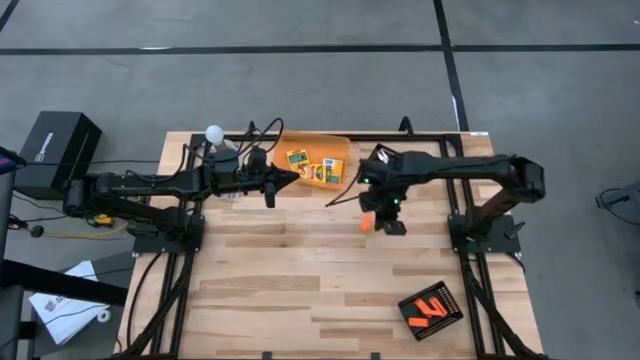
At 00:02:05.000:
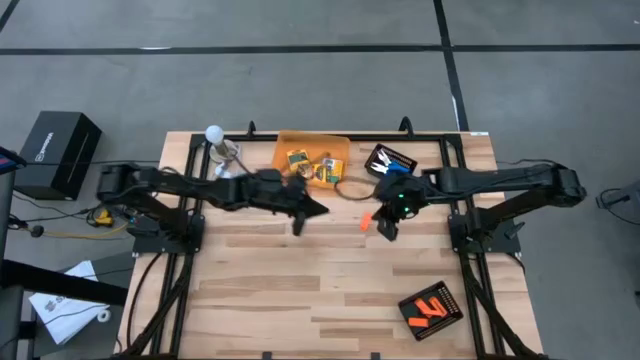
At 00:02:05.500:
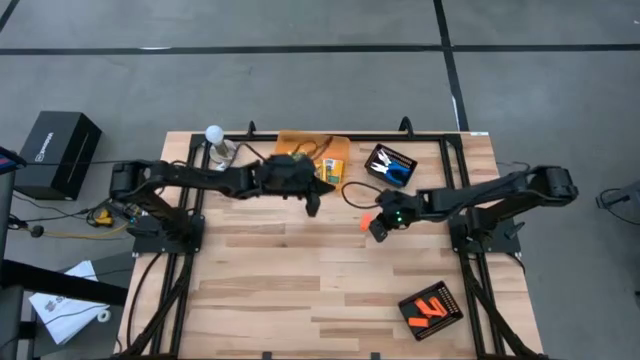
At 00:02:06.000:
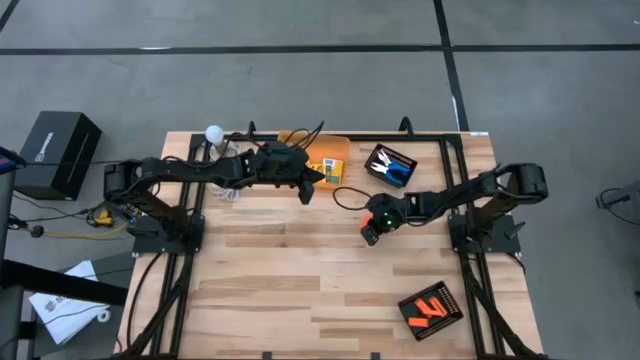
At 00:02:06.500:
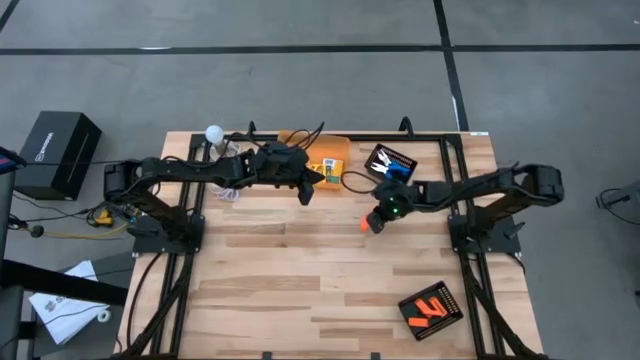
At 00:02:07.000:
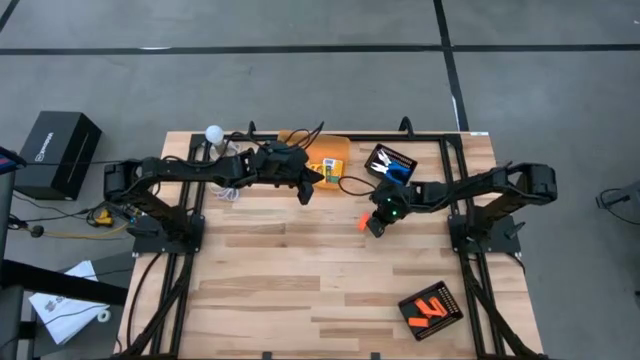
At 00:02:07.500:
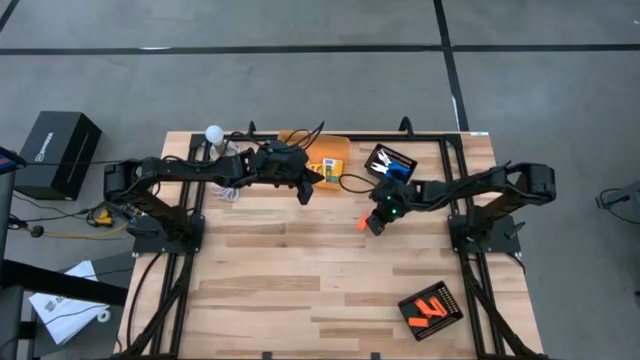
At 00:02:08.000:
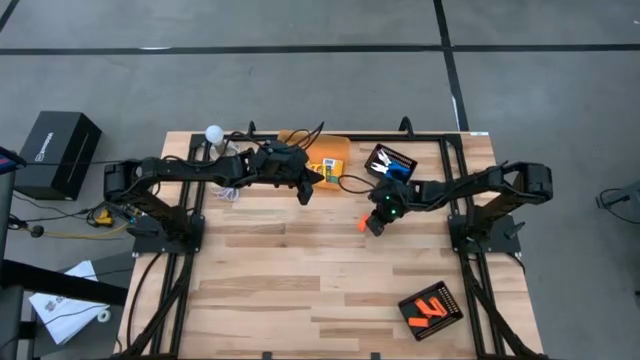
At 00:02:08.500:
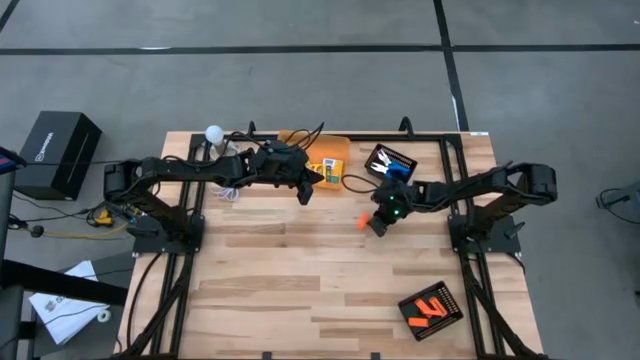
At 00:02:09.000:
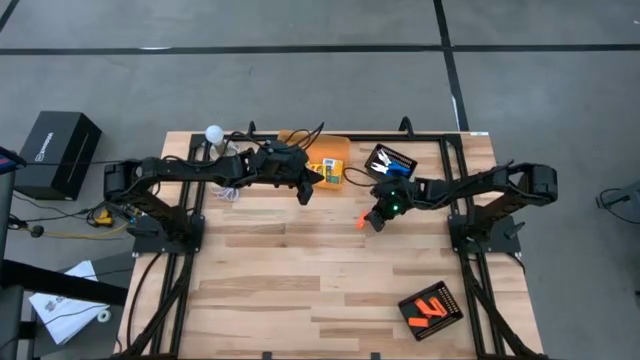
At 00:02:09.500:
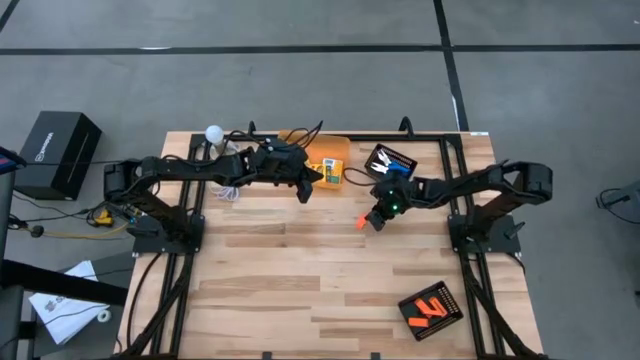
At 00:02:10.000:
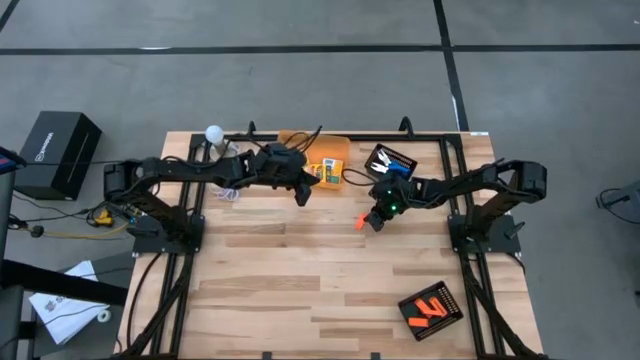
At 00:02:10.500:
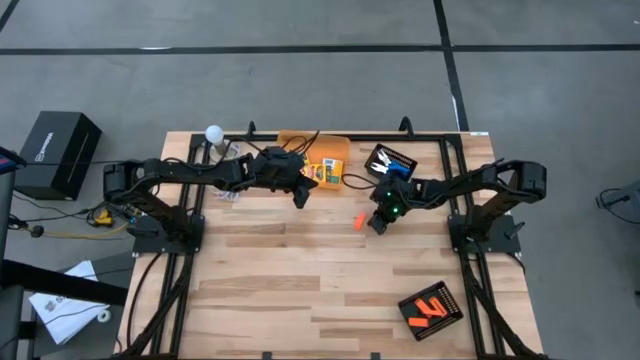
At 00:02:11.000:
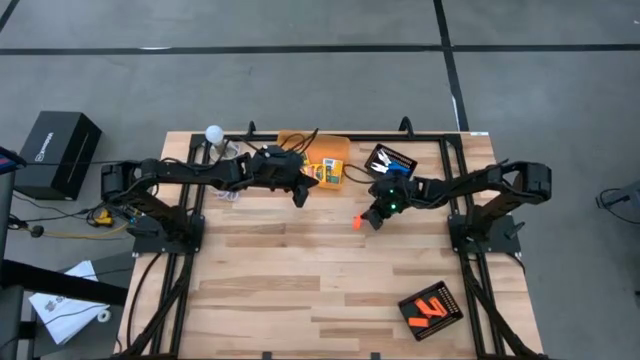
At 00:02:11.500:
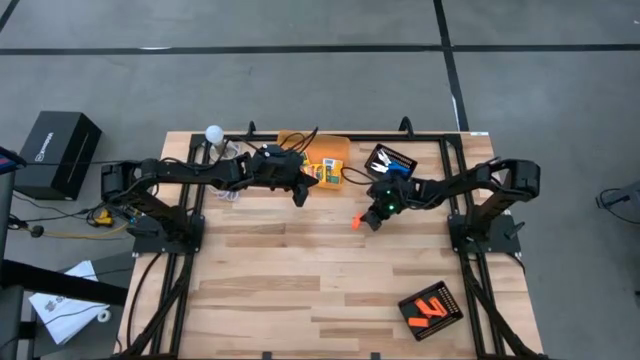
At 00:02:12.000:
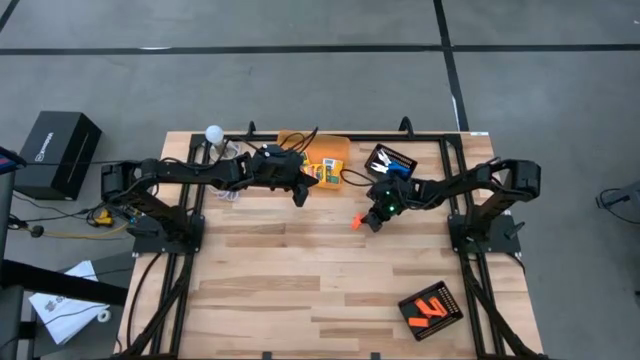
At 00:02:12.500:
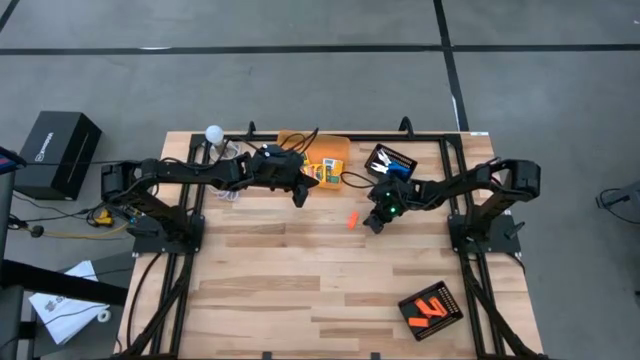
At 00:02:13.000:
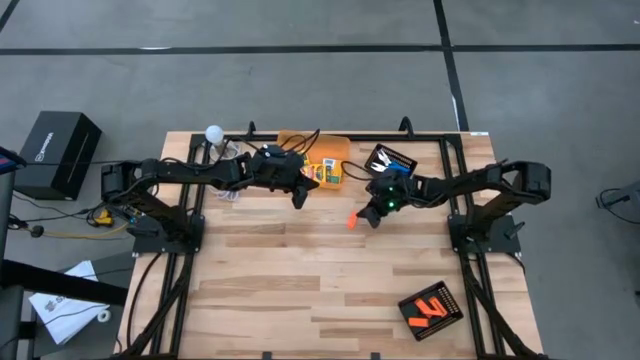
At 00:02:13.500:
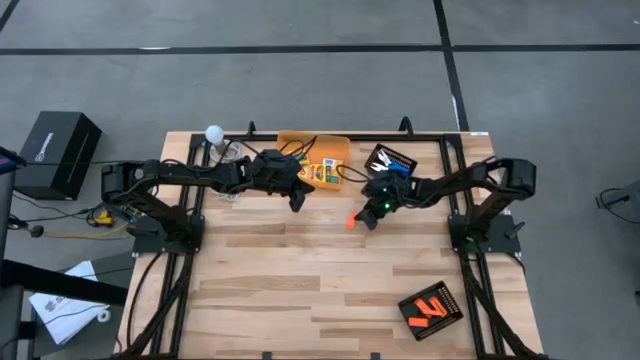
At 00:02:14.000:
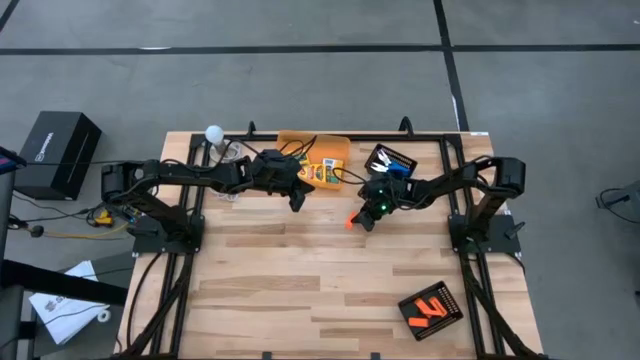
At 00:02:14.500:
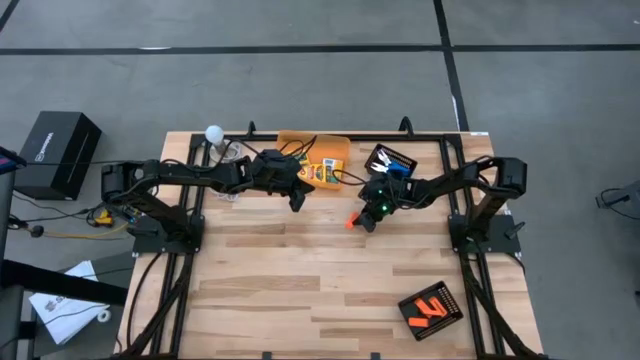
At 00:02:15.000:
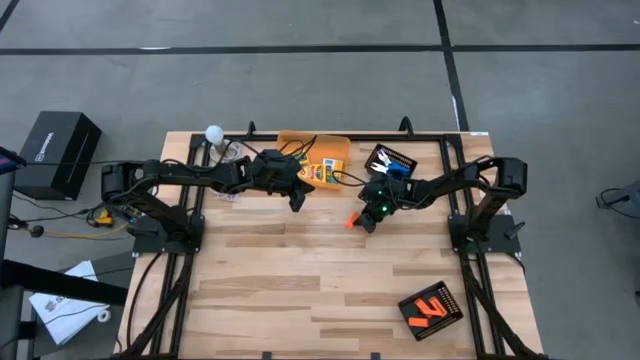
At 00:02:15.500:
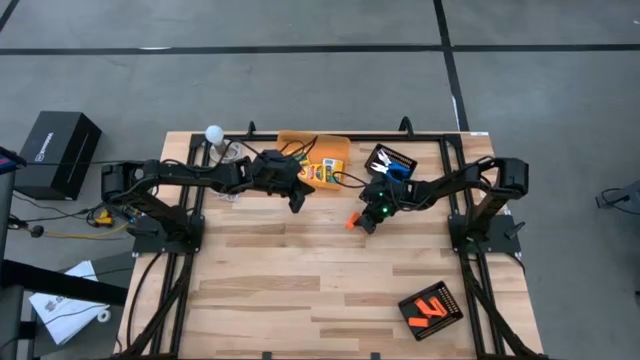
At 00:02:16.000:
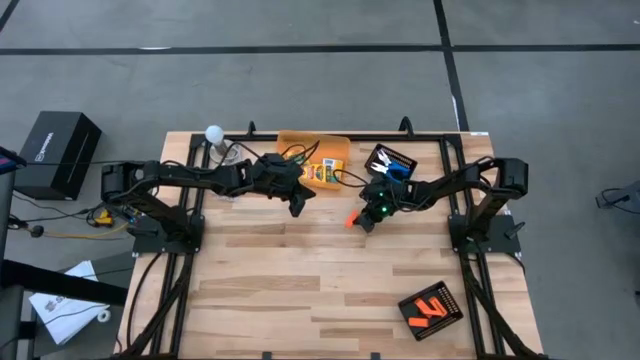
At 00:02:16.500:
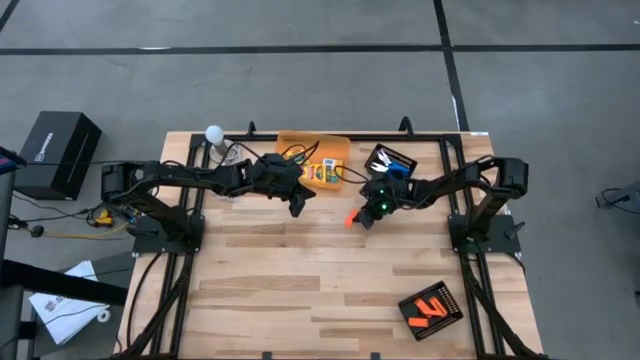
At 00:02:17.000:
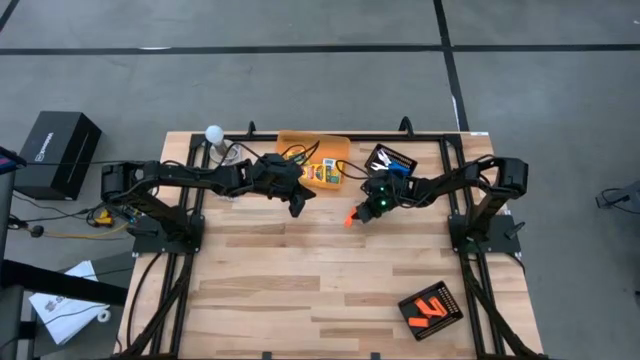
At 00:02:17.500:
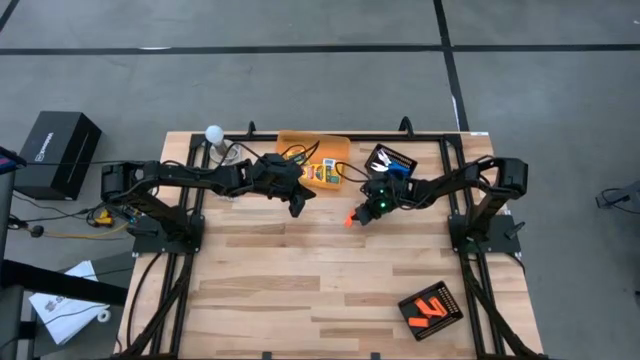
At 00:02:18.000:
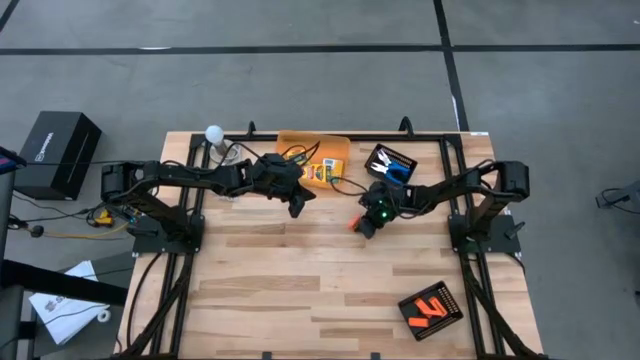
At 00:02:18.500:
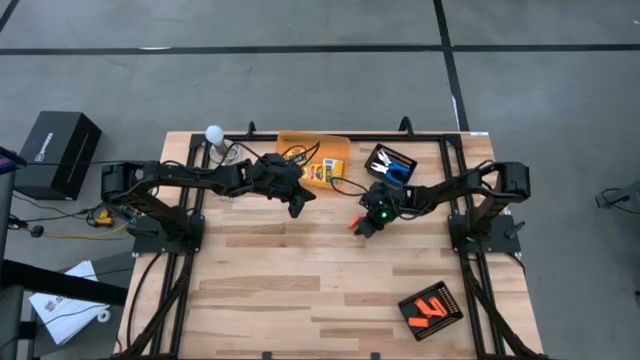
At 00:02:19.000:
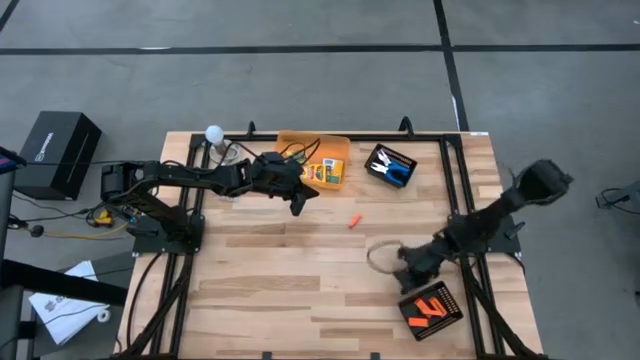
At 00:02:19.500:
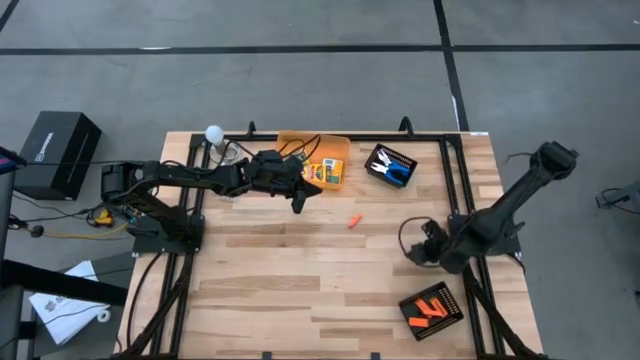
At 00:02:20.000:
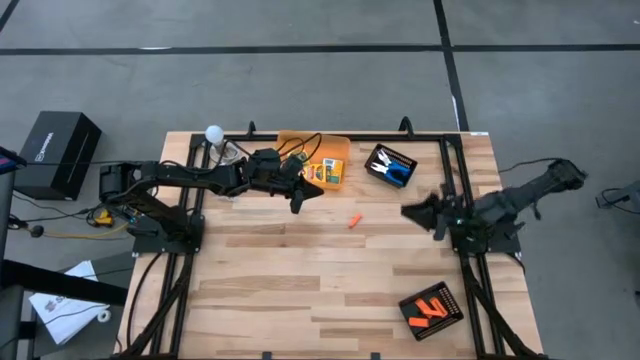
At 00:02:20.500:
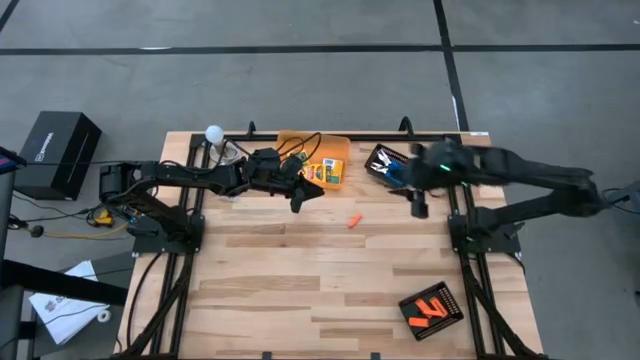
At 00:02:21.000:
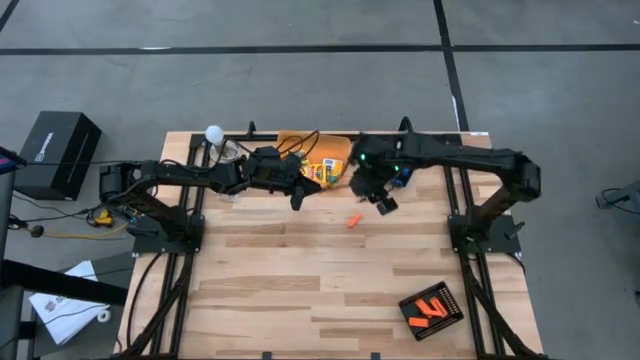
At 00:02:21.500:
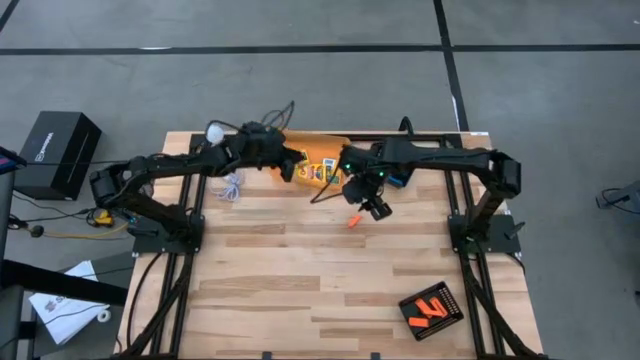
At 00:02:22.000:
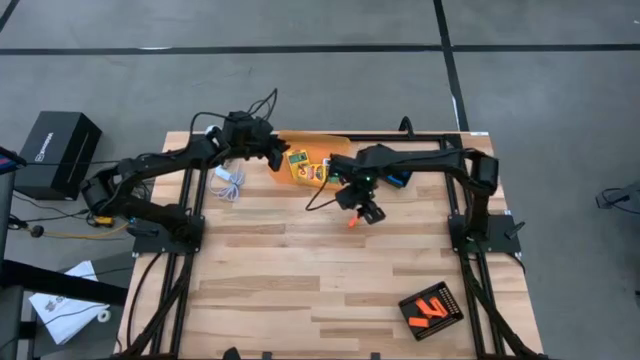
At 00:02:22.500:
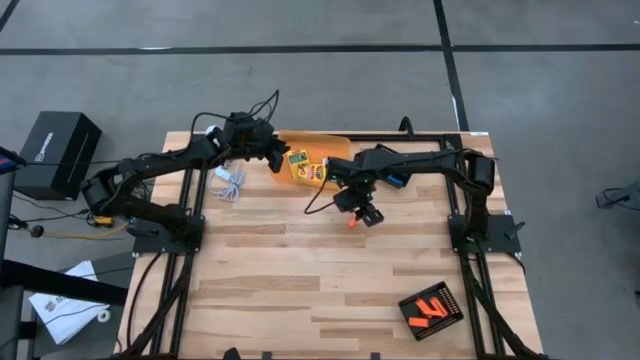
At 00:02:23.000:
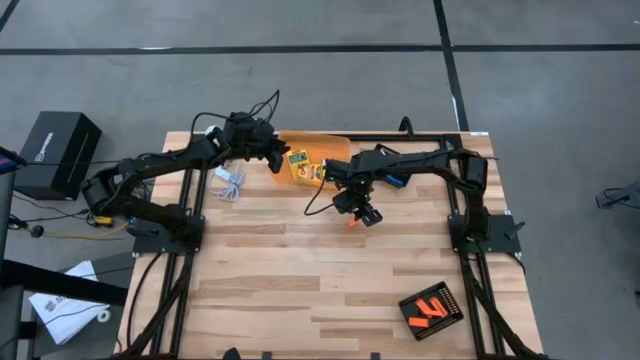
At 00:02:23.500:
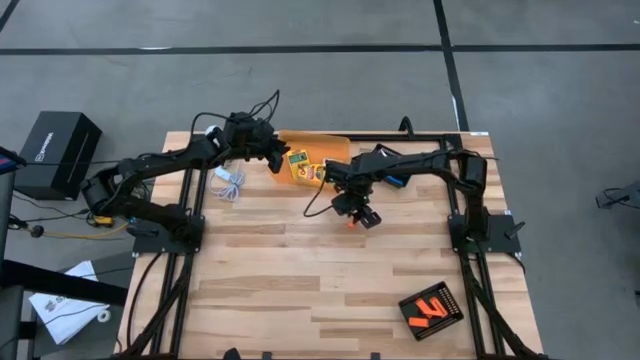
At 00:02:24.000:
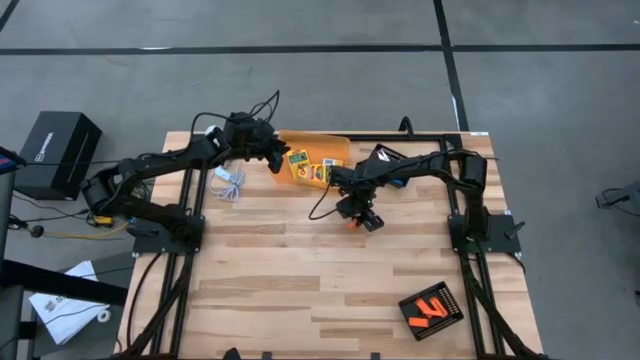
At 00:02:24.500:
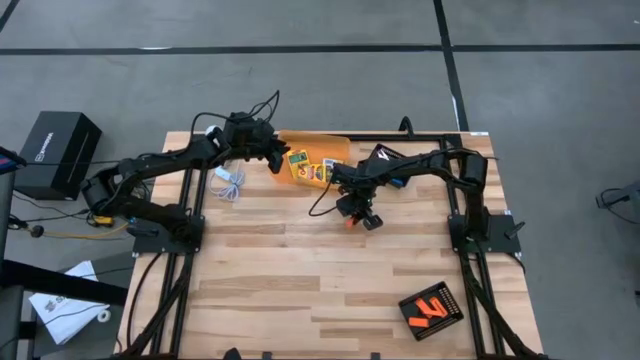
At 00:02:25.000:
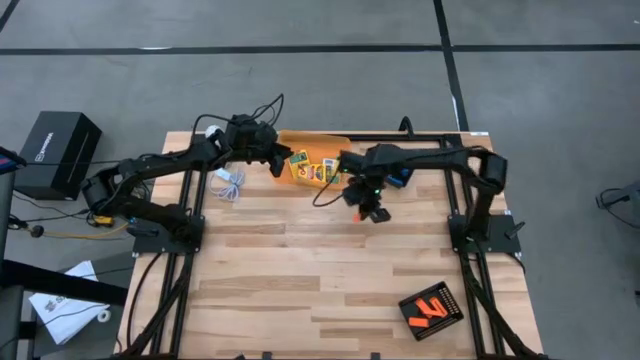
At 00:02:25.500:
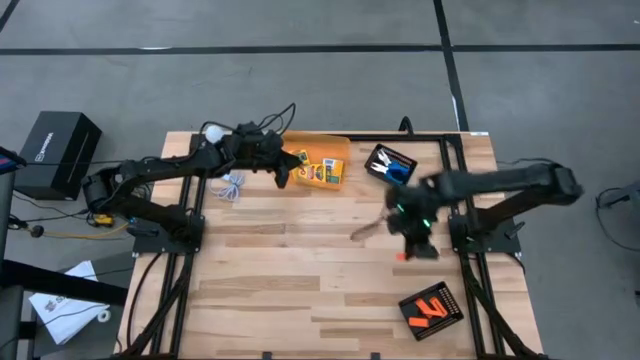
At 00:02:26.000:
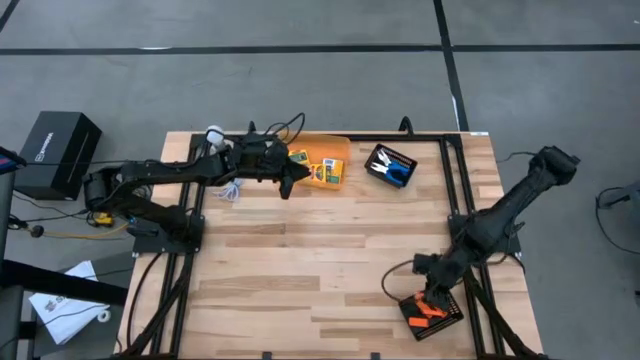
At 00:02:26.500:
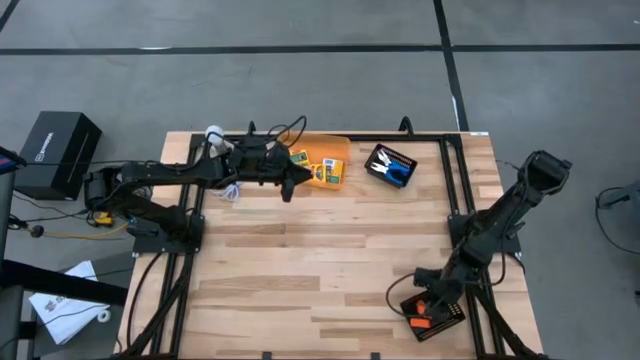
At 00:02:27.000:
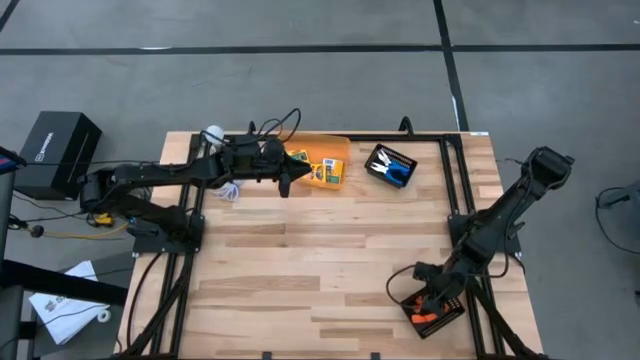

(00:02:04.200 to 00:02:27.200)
Task: Pick & Place School Supplies
Put the orange eraser into the bottom black bin
